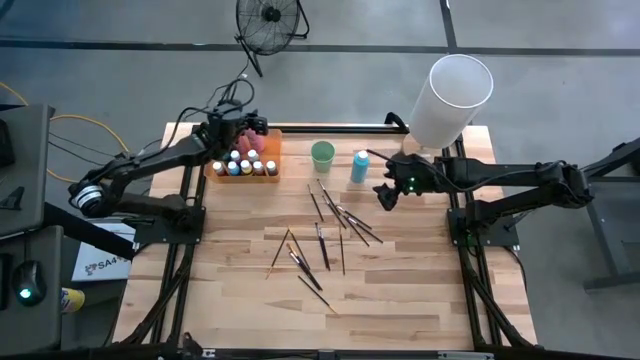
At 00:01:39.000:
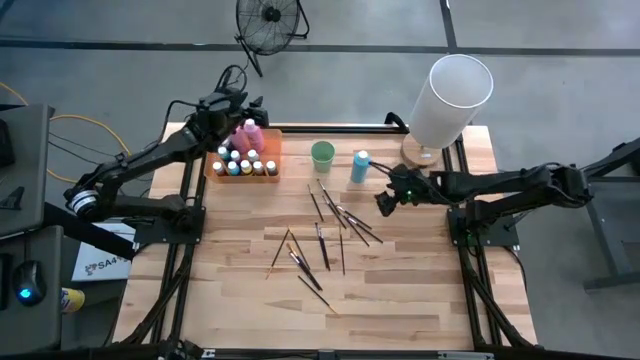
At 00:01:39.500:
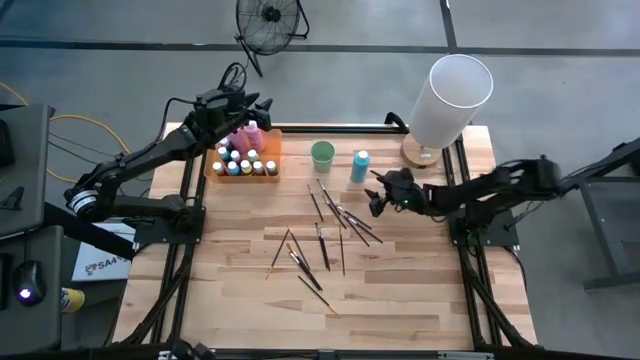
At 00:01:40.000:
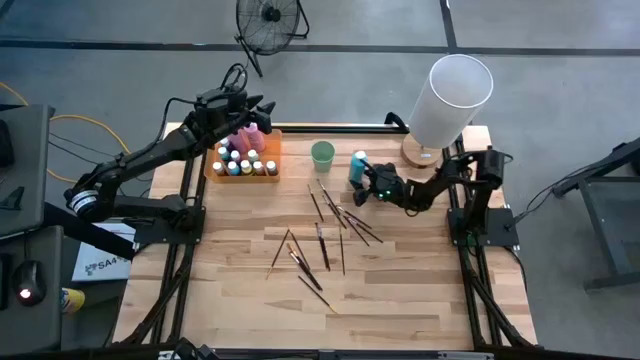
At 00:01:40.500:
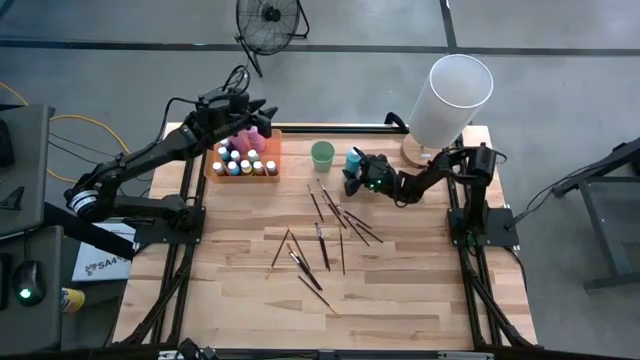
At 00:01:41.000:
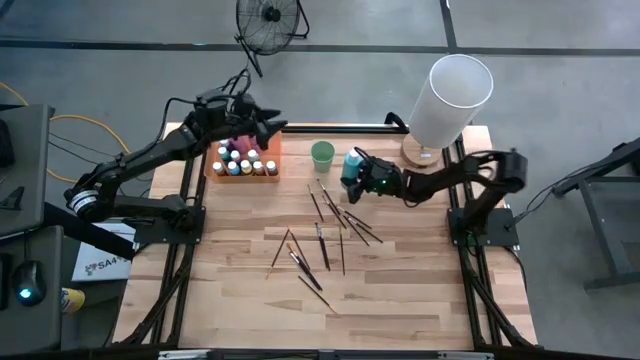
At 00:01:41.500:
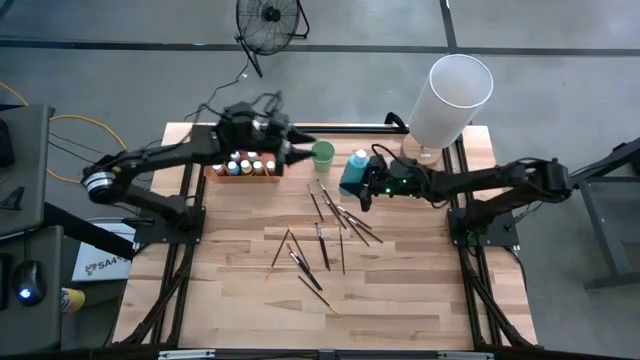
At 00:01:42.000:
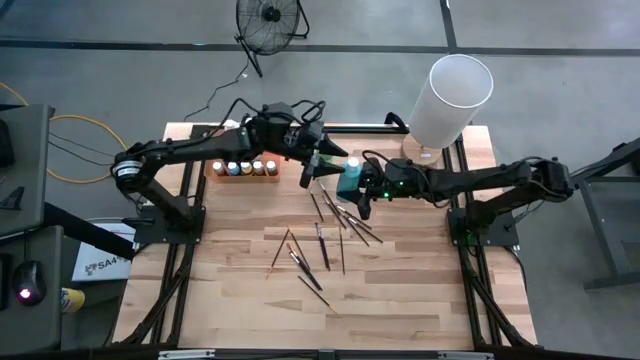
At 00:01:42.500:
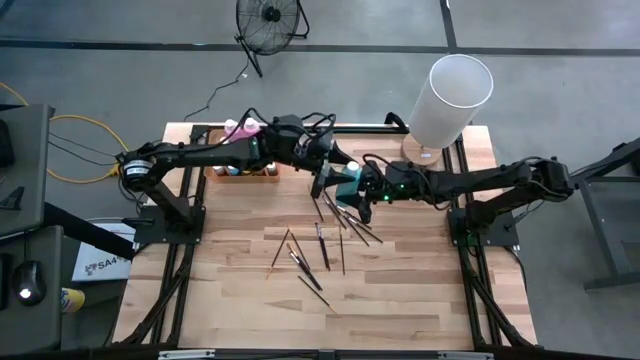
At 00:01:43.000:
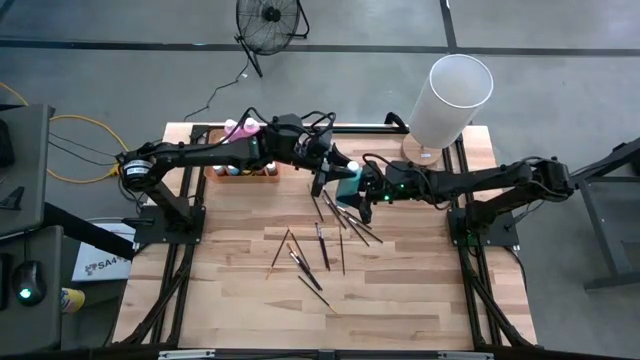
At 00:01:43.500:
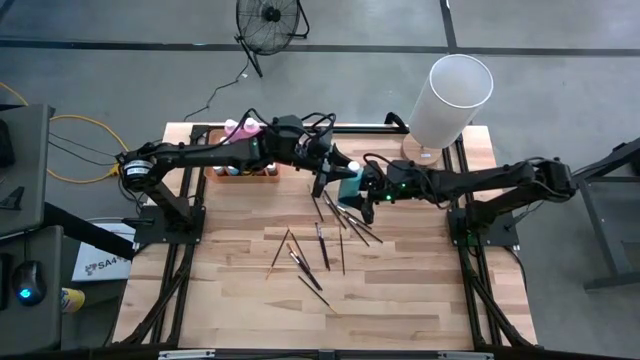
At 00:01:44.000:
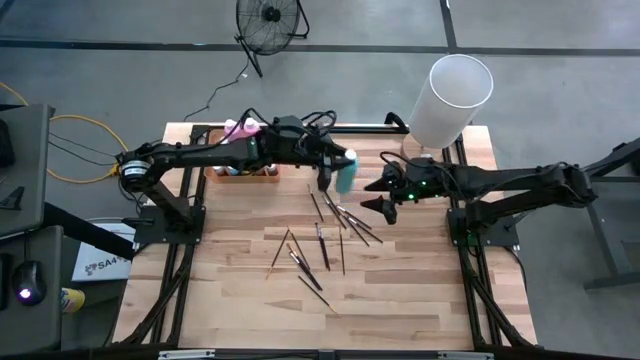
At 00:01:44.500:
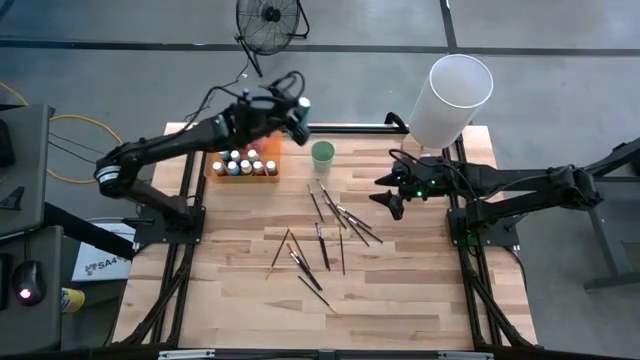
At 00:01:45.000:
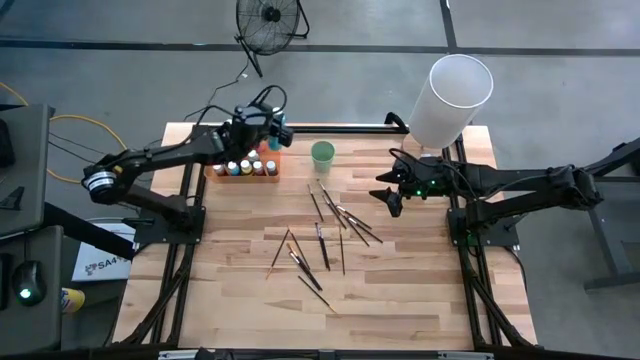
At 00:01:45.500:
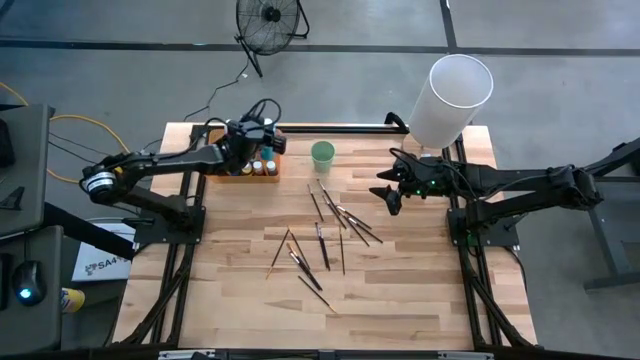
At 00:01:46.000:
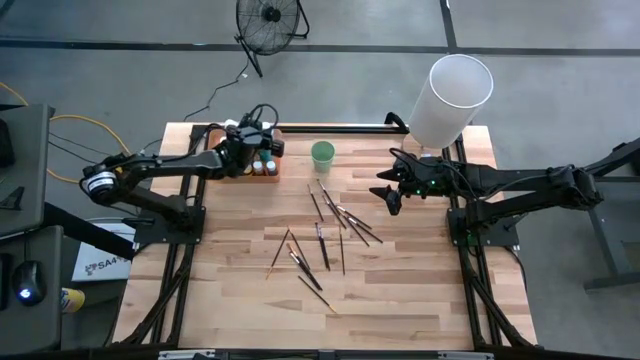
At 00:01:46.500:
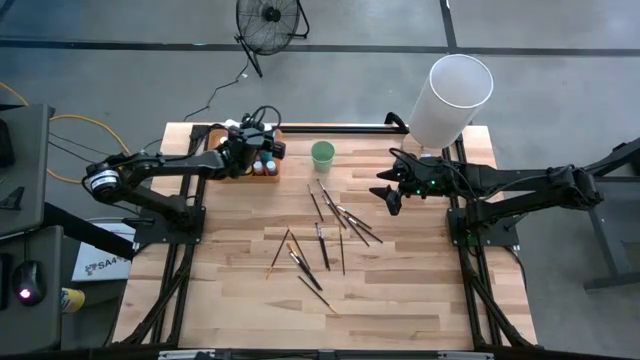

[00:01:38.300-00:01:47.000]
Task: Pick & Place Paint Supplies
Put the blue paint bottle into the orange bin

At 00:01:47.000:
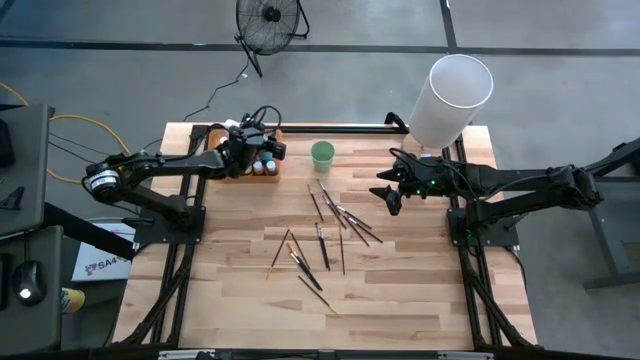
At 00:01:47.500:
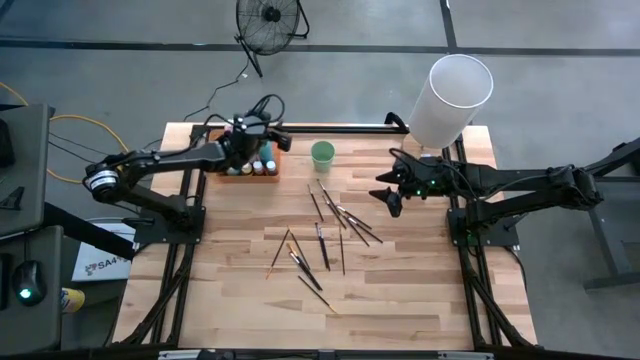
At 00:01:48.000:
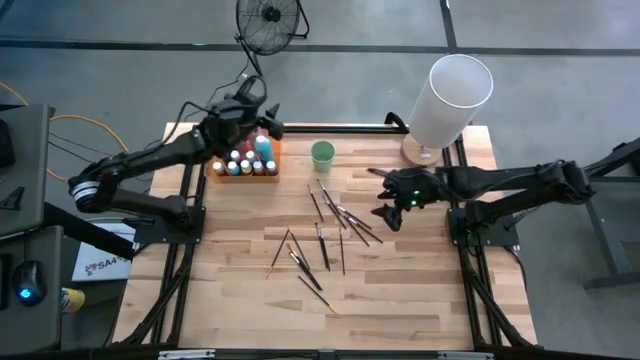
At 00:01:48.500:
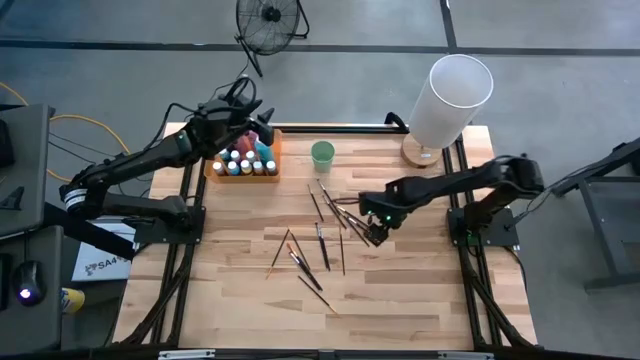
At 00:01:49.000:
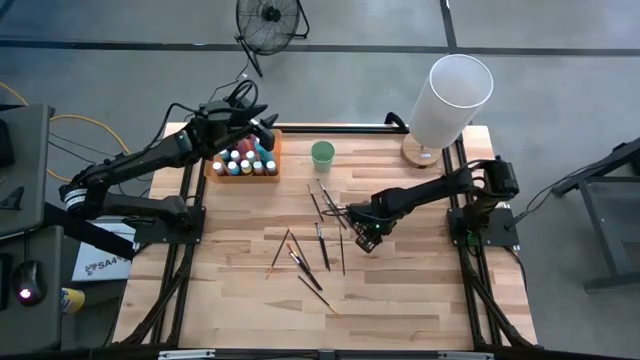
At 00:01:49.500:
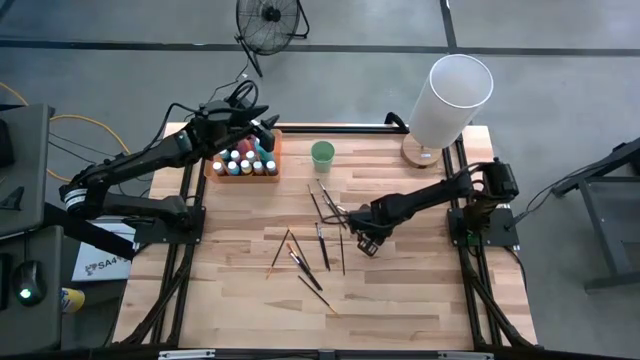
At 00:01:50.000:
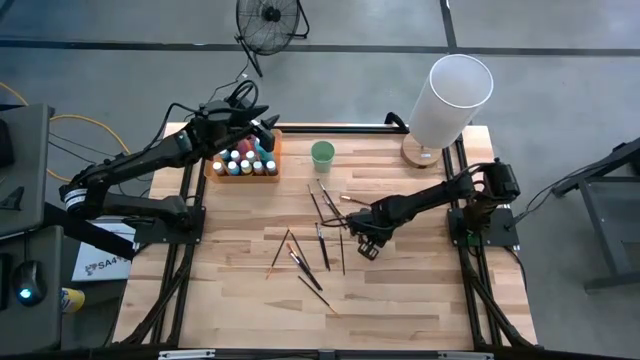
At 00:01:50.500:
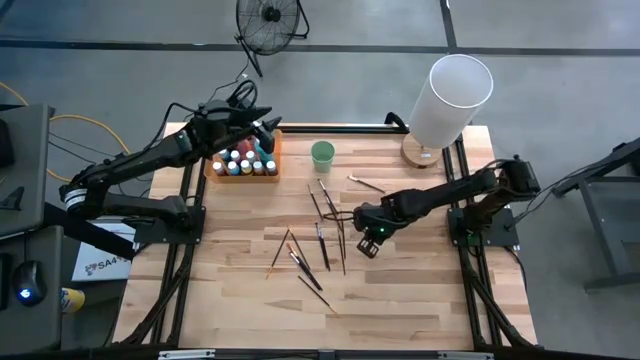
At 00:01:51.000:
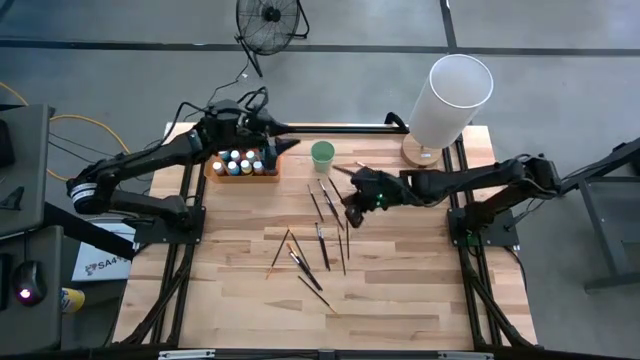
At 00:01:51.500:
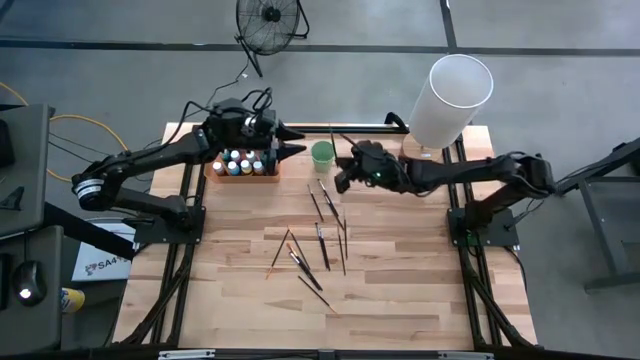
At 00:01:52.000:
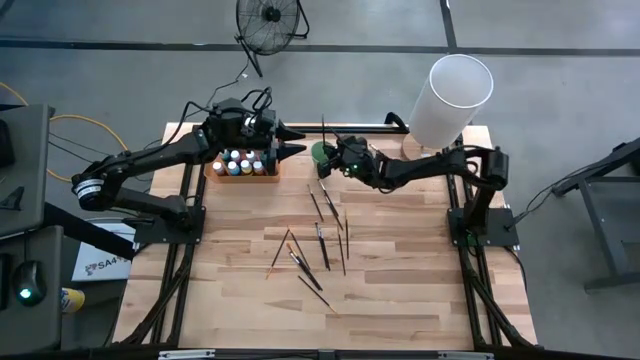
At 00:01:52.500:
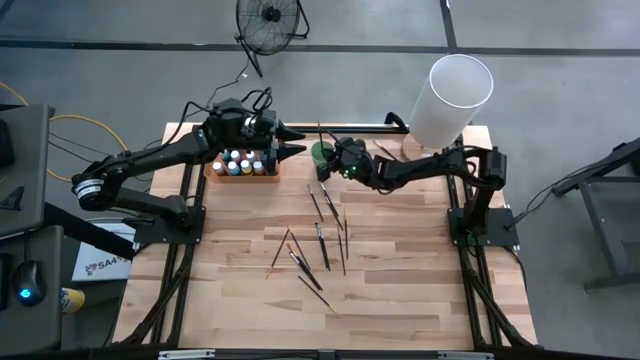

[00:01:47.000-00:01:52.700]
Put the black paint brush into the orange bin

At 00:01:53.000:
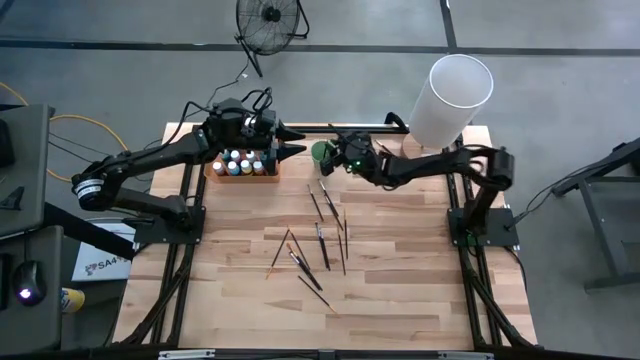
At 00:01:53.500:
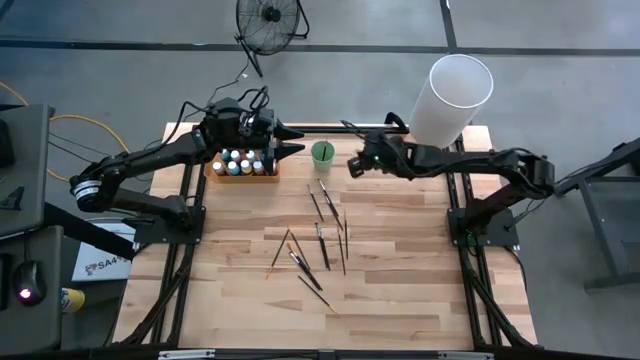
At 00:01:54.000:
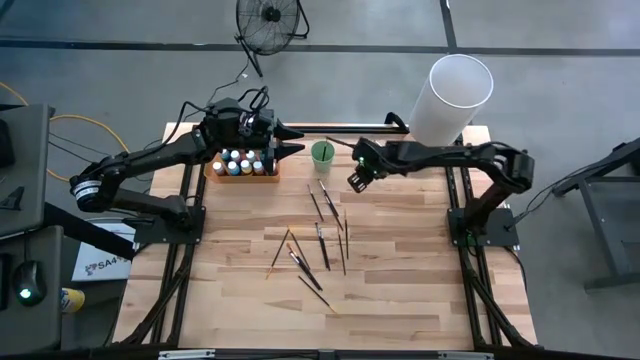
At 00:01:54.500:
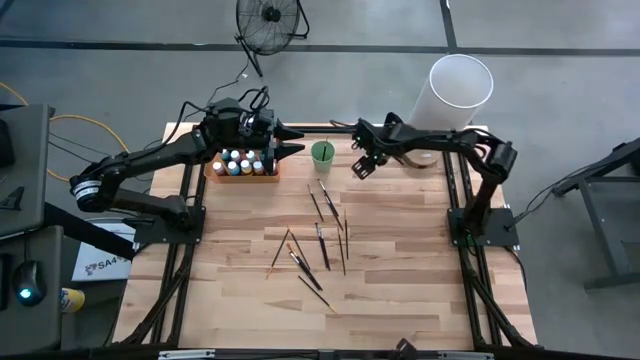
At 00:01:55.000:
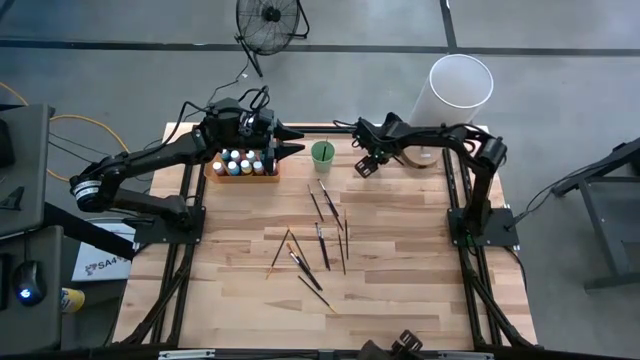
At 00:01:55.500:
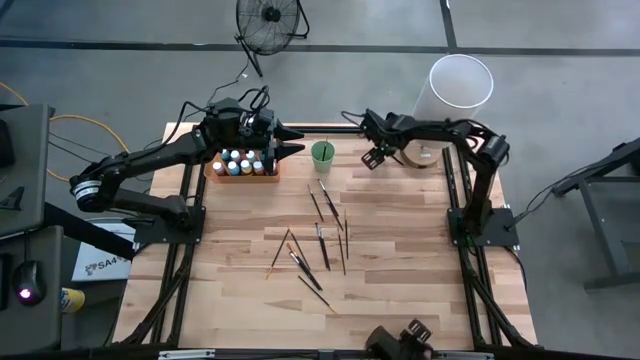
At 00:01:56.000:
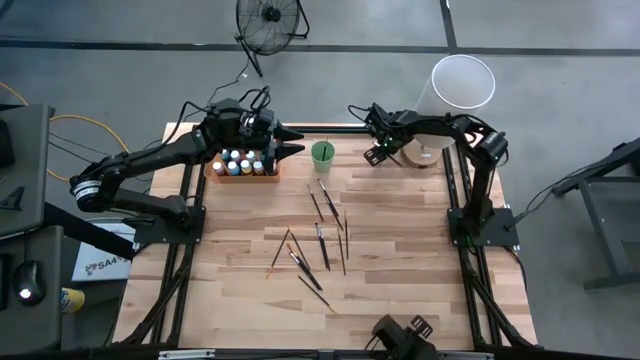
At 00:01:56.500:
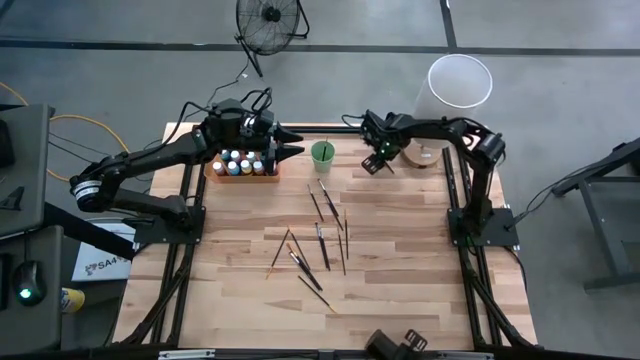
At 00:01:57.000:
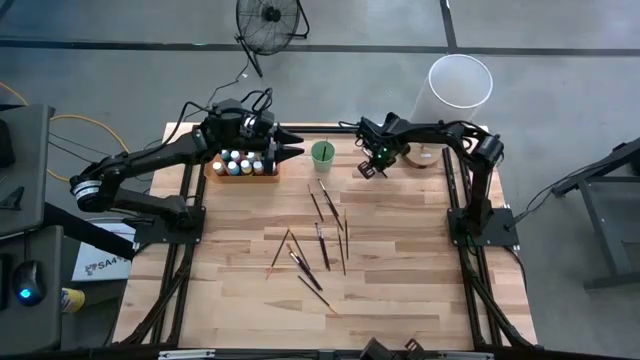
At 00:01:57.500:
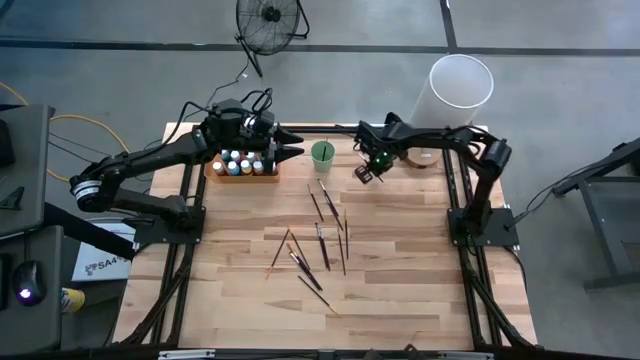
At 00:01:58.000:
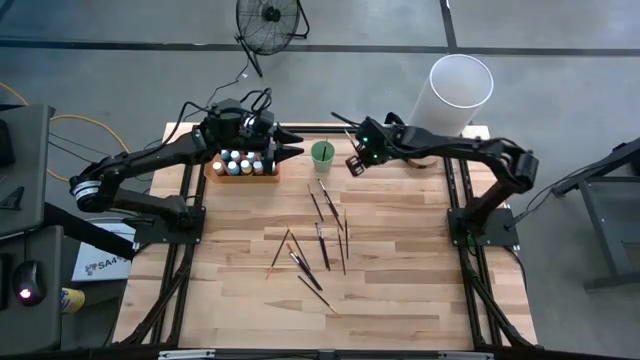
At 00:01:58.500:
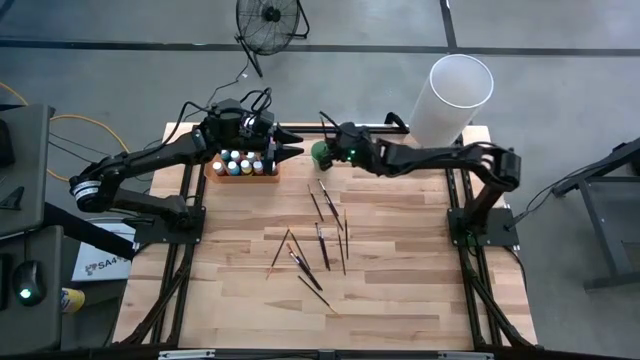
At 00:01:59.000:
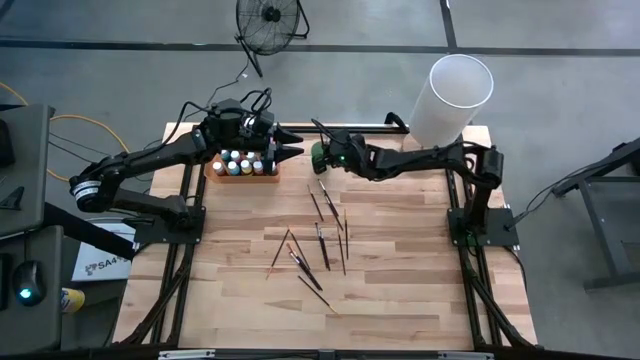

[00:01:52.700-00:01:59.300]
Put the black paint brush into the green cup
